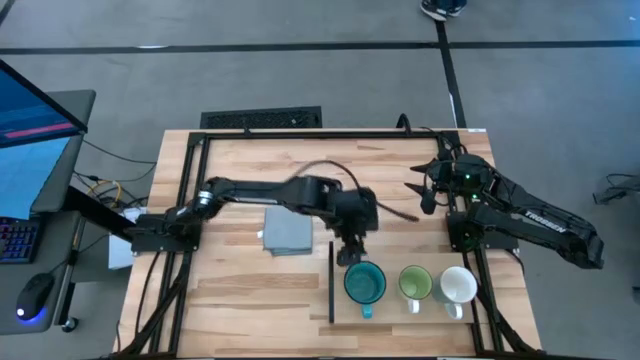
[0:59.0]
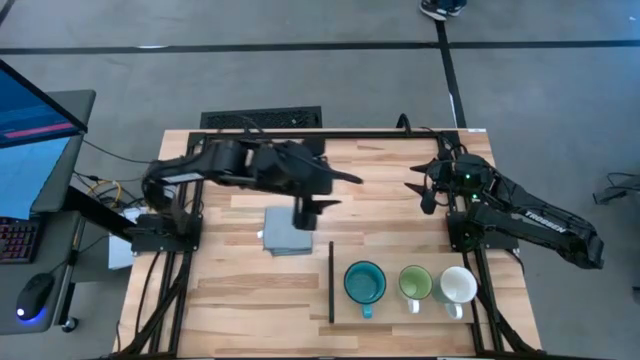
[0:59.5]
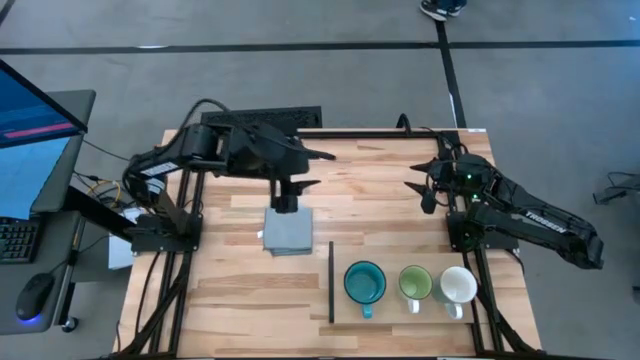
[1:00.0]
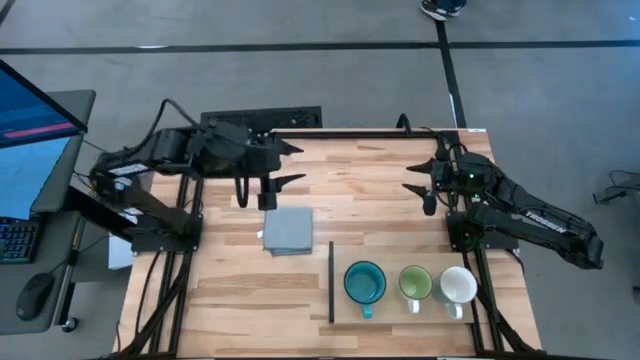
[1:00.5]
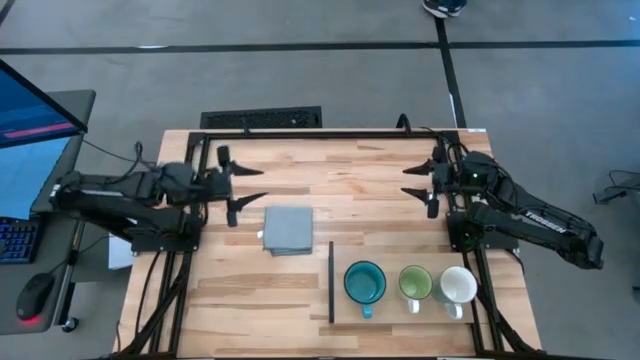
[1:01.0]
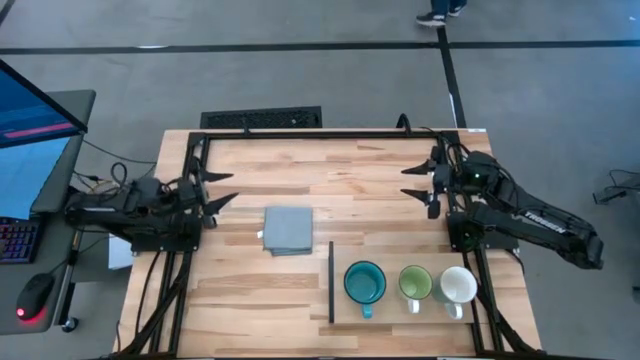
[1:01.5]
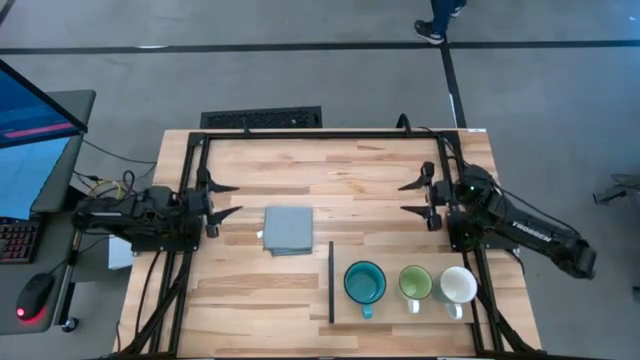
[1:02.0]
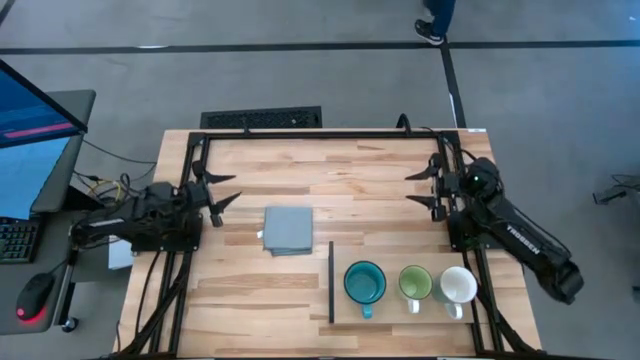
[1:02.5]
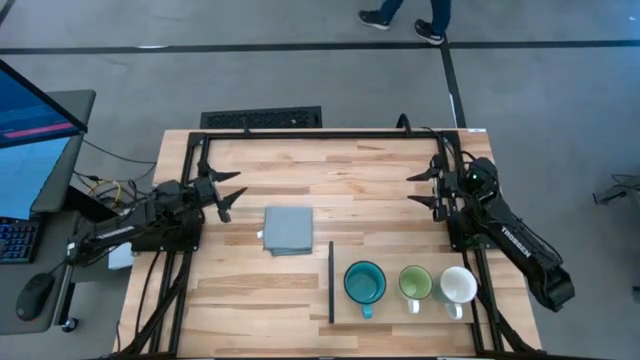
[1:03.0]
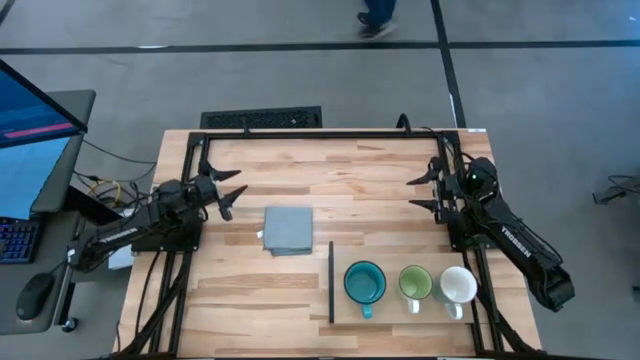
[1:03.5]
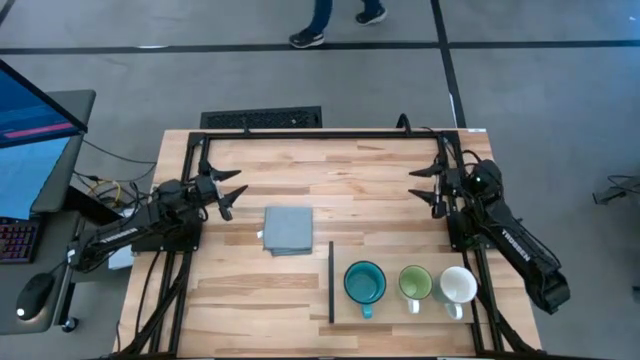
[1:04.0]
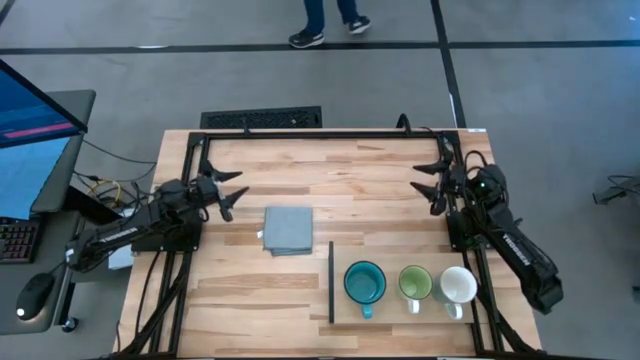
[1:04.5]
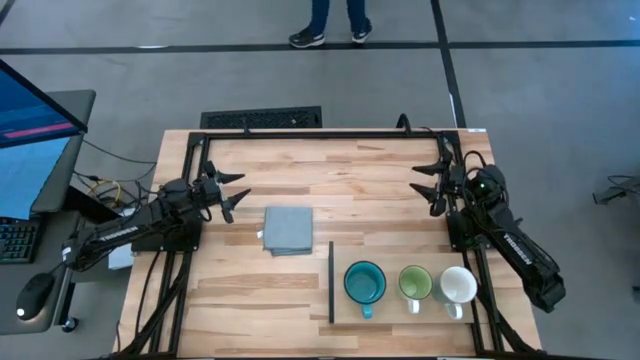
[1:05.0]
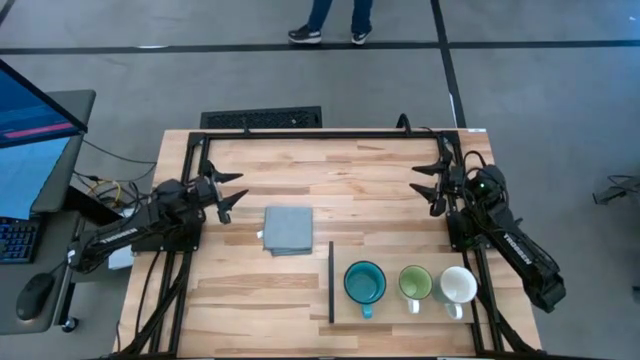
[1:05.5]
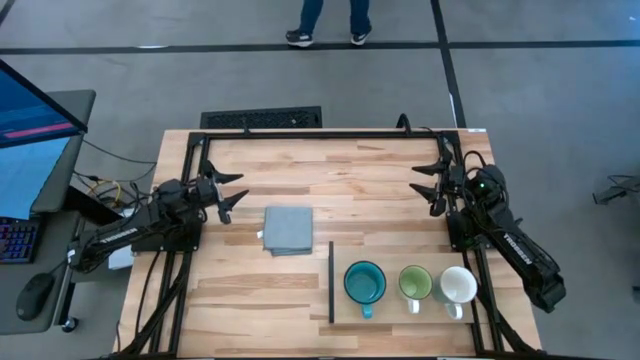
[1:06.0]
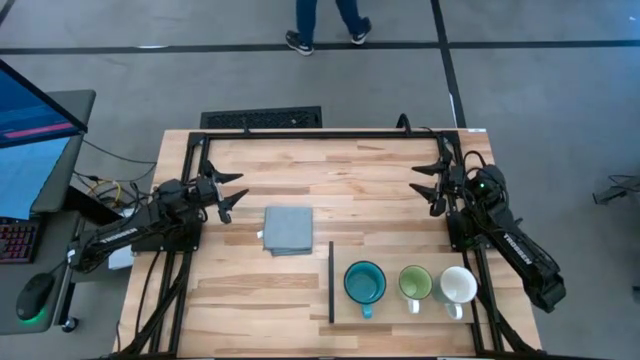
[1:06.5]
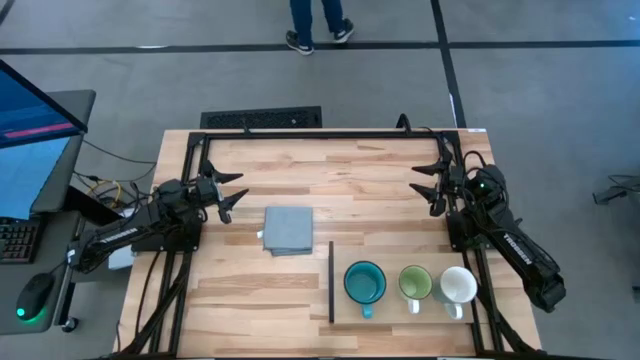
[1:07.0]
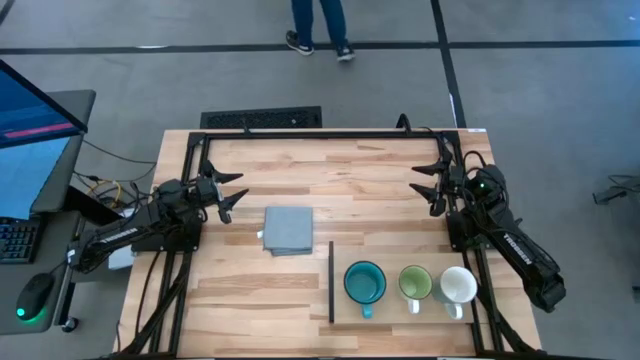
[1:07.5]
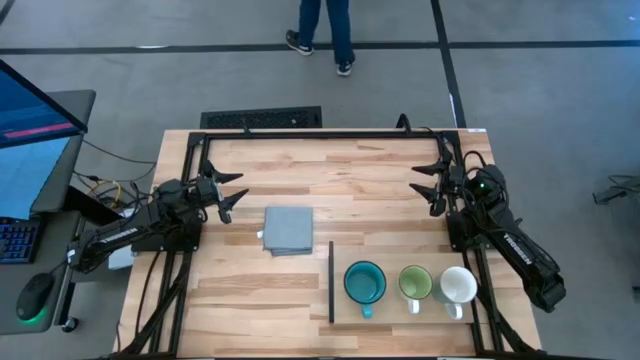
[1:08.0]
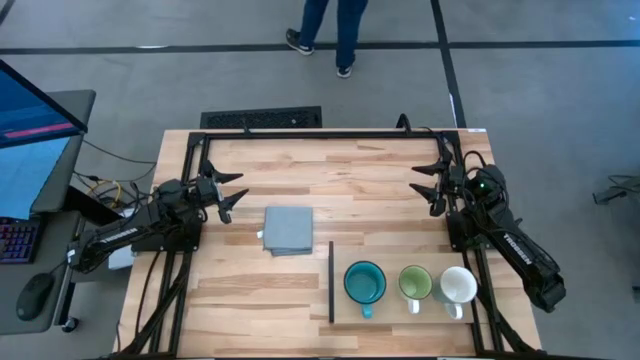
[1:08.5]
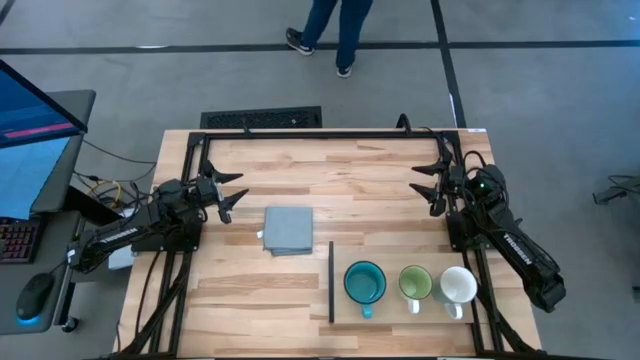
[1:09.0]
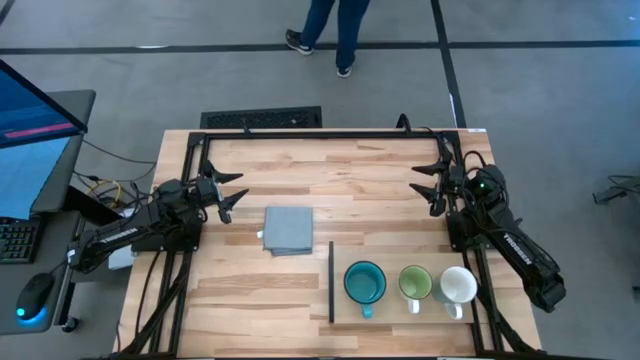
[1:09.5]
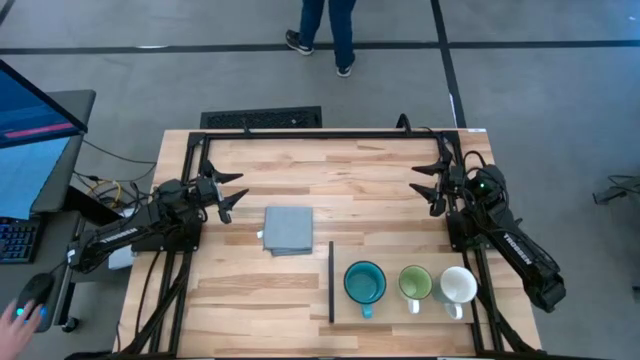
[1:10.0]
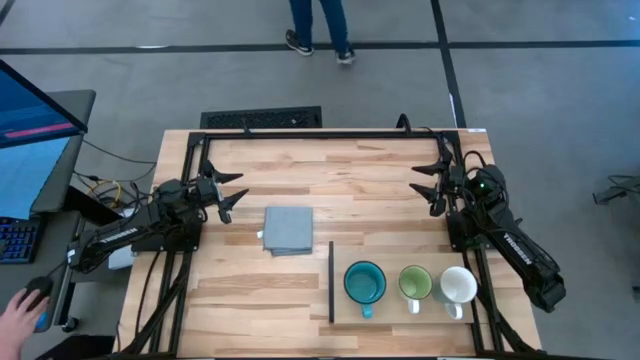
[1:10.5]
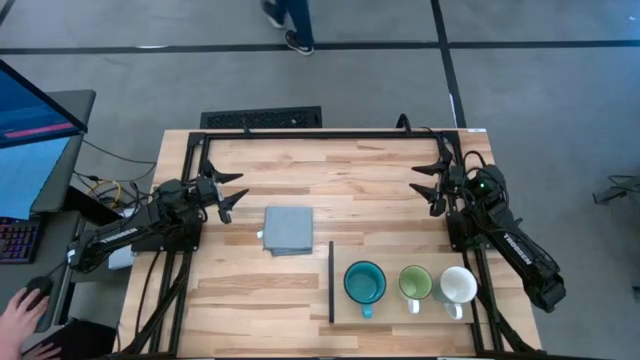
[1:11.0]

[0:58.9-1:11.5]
Task: Stack small to large cups/mugs on shelf
Return to Home Position

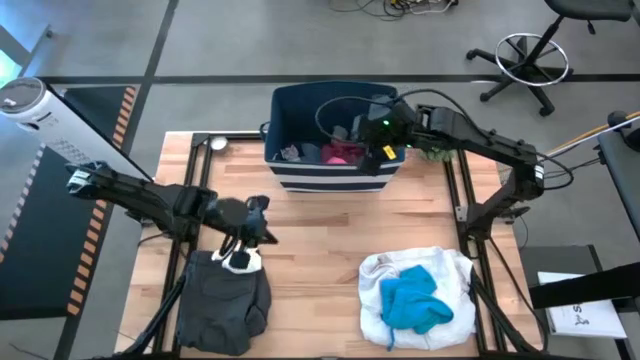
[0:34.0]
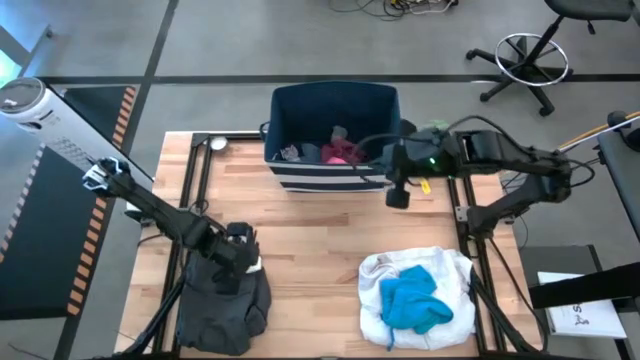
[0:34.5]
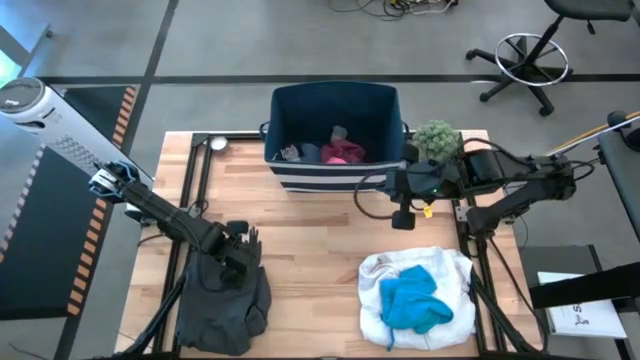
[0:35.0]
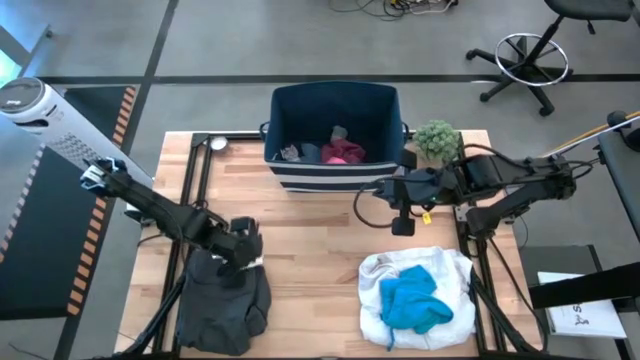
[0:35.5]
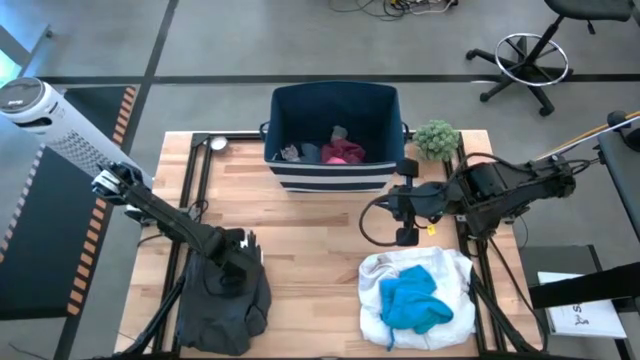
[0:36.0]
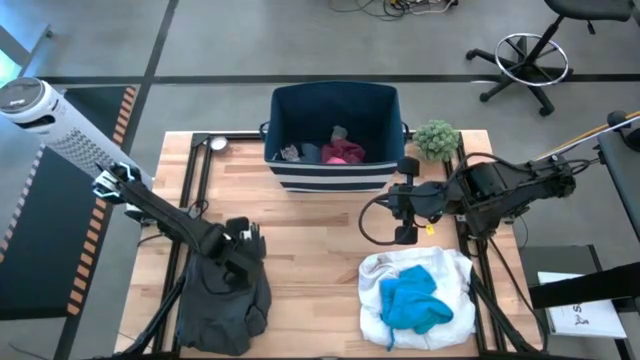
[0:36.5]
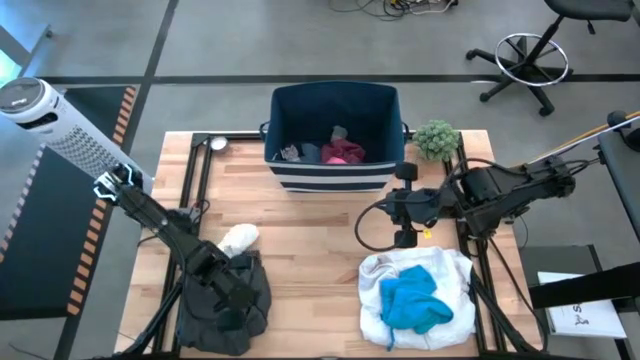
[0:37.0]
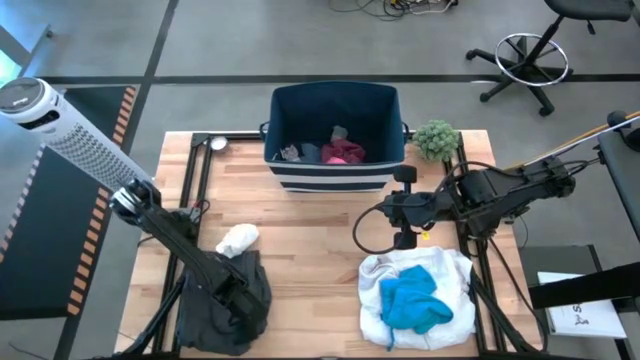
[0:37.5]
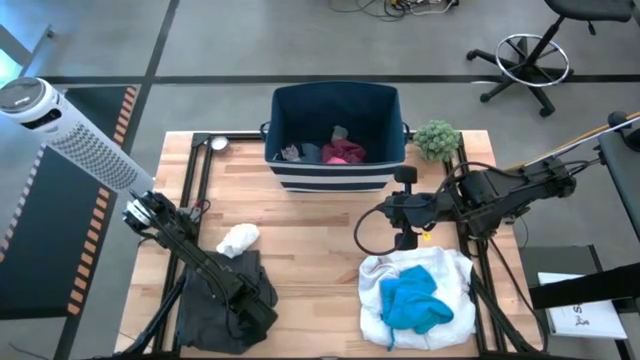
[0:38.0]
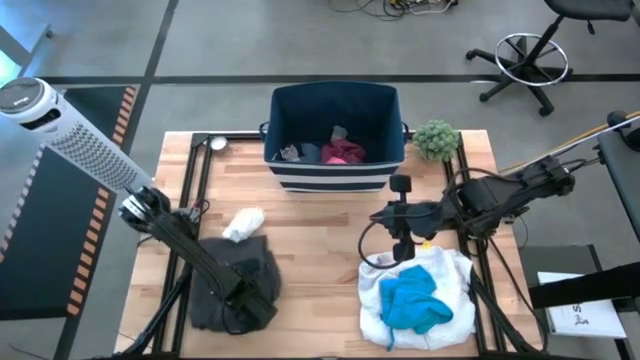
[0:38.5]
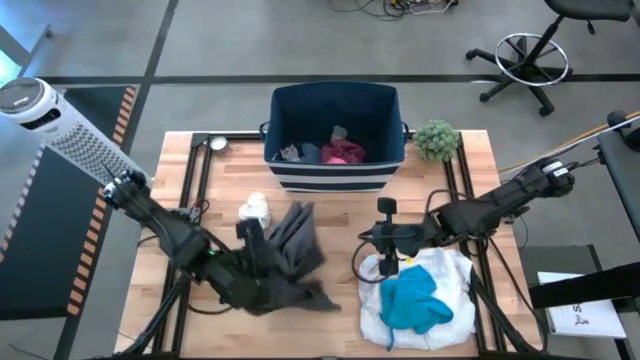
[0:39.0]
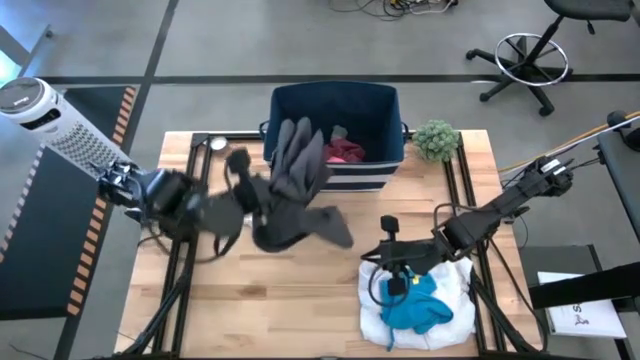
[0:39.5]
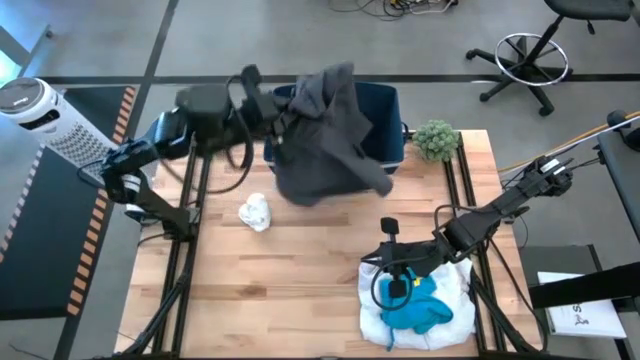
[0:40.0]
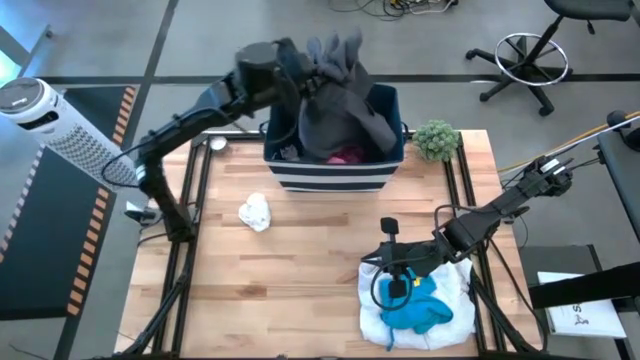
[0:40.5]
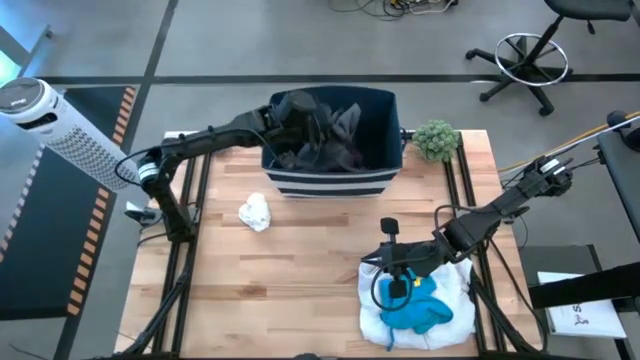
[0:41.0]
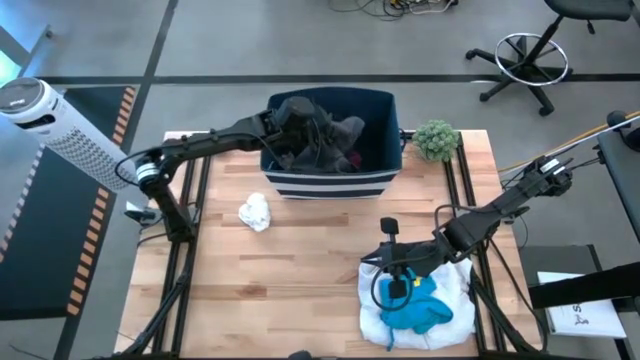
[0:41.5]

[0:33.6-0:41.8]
Task: Sort clothes
Put the dark gray shorts into the laundry organizer
